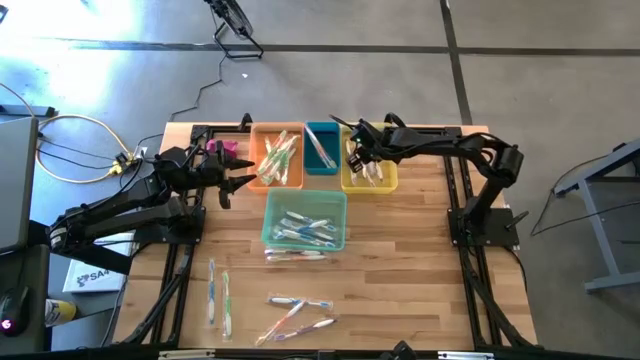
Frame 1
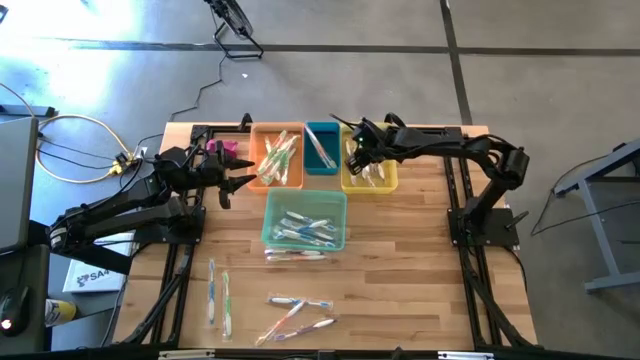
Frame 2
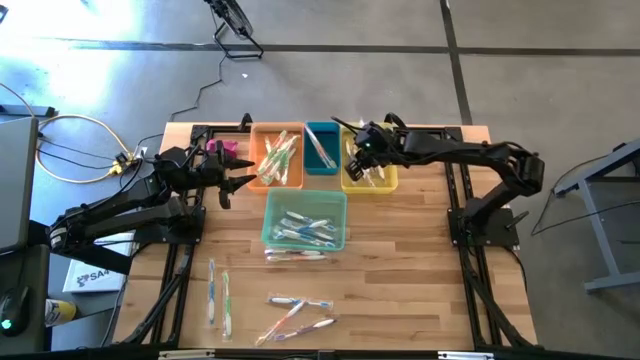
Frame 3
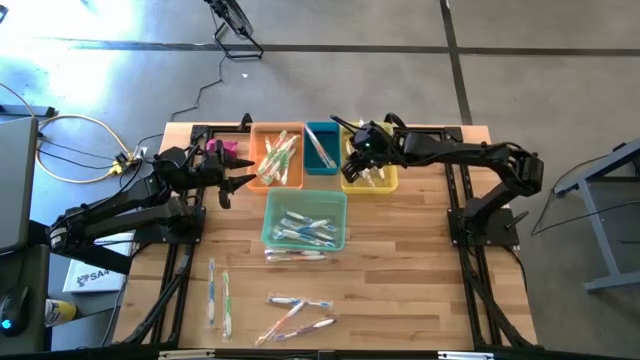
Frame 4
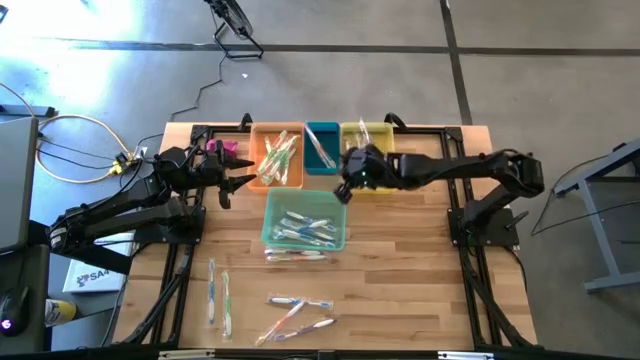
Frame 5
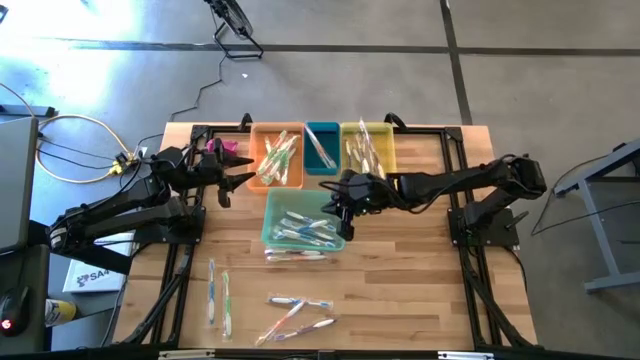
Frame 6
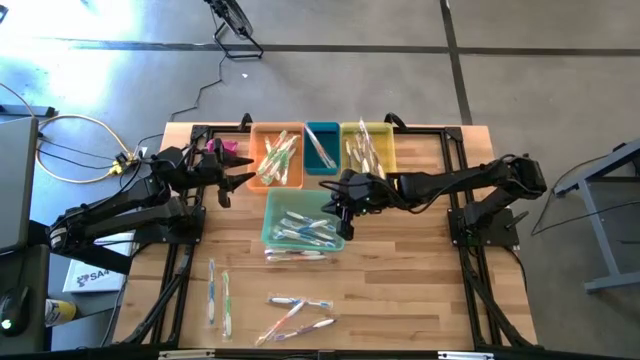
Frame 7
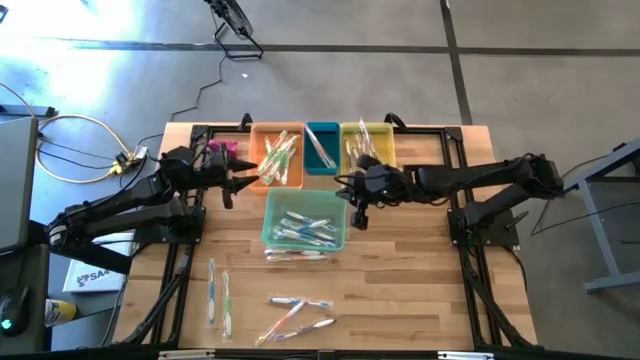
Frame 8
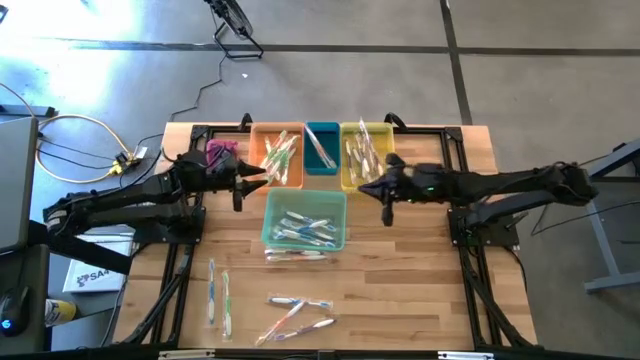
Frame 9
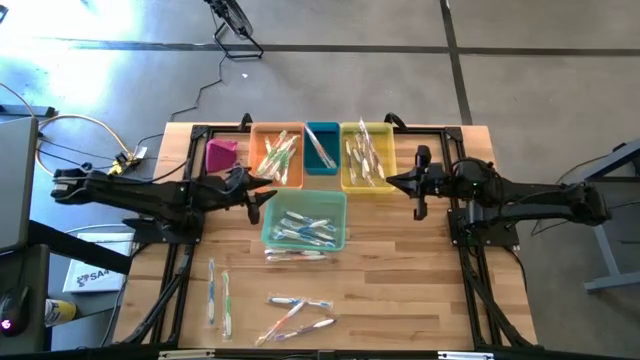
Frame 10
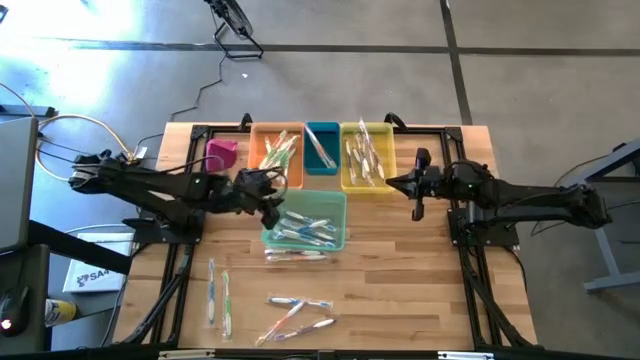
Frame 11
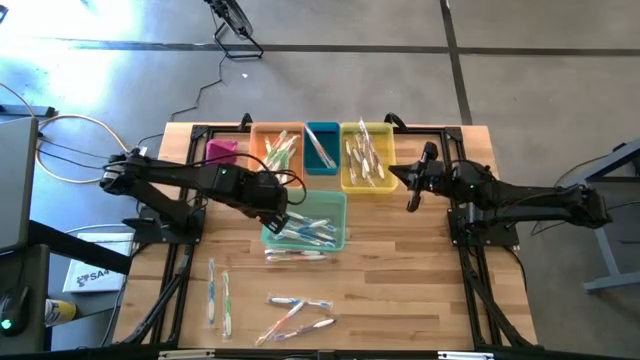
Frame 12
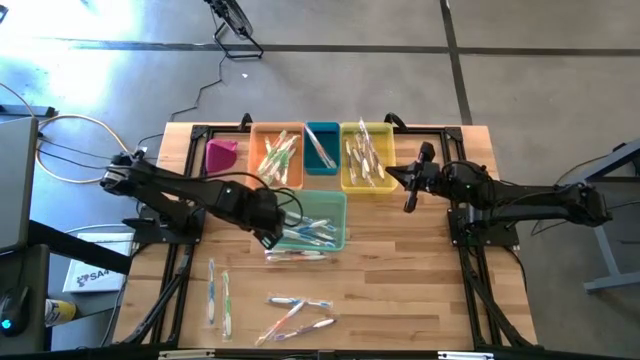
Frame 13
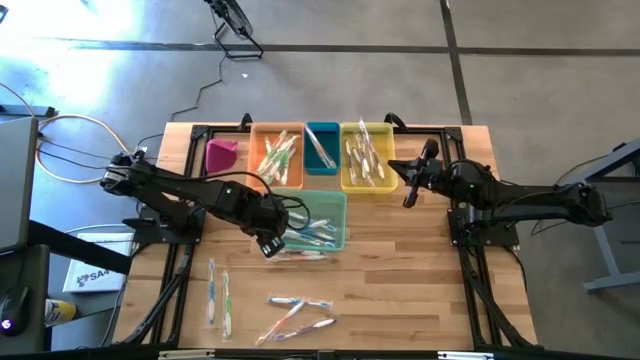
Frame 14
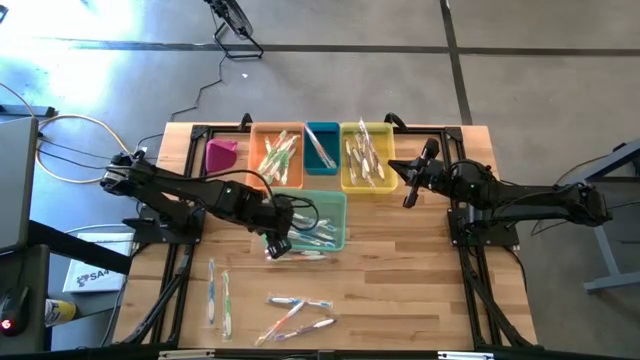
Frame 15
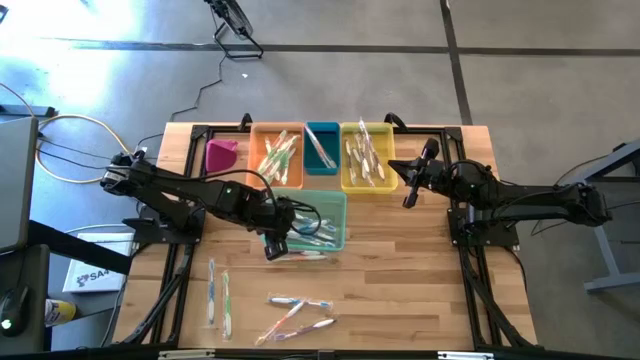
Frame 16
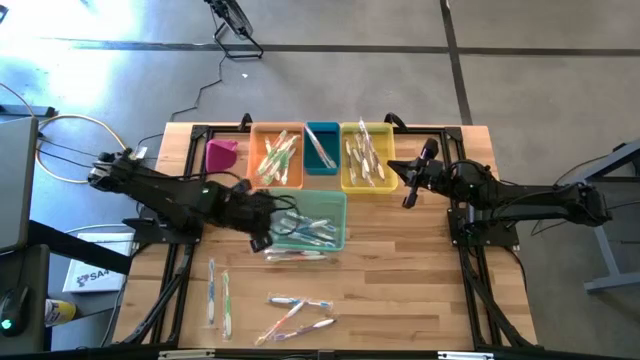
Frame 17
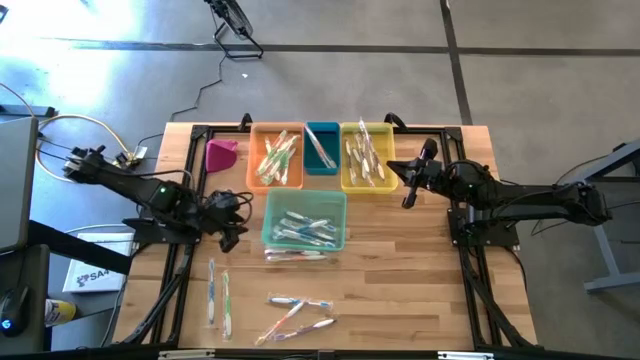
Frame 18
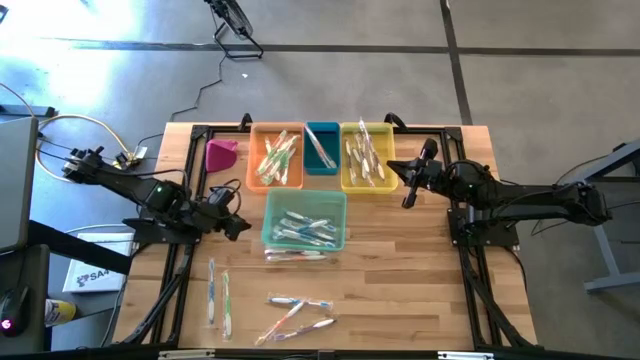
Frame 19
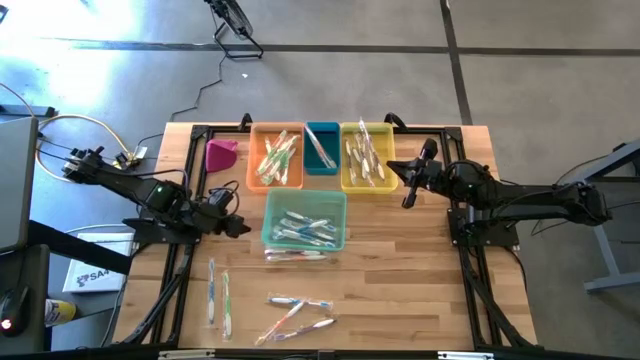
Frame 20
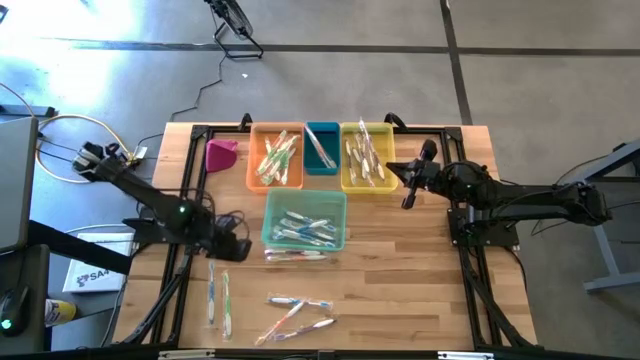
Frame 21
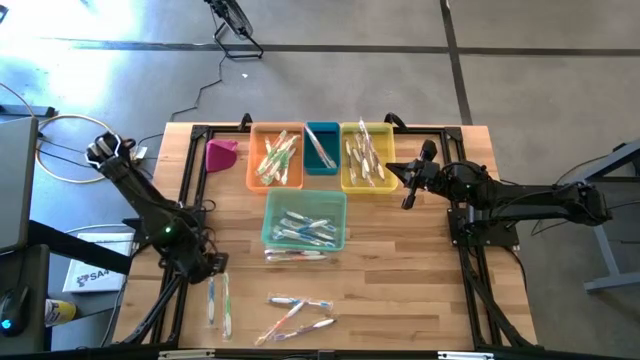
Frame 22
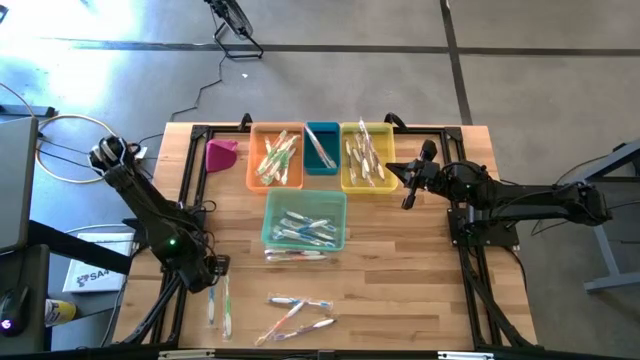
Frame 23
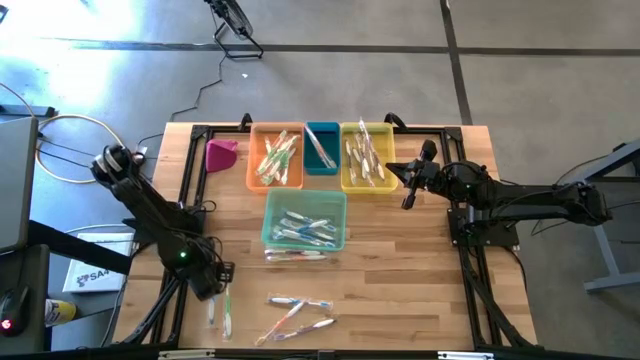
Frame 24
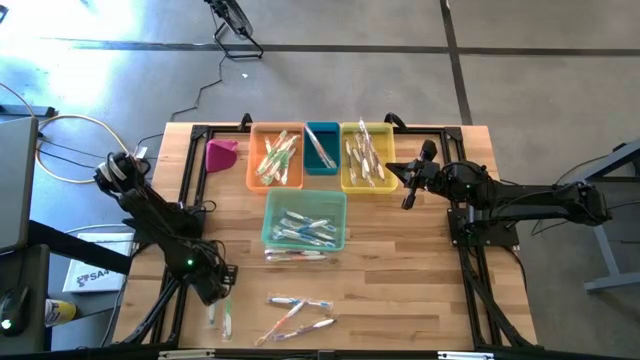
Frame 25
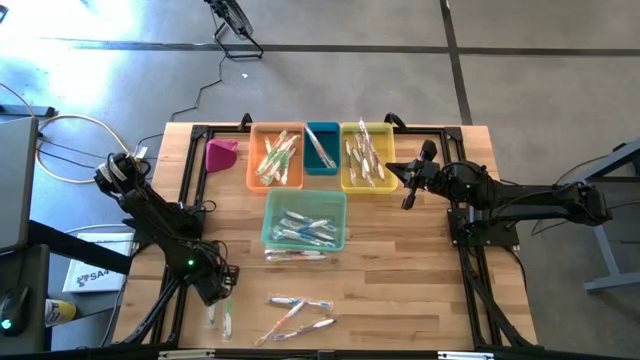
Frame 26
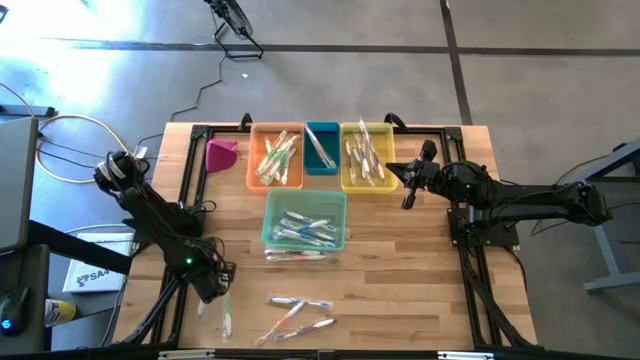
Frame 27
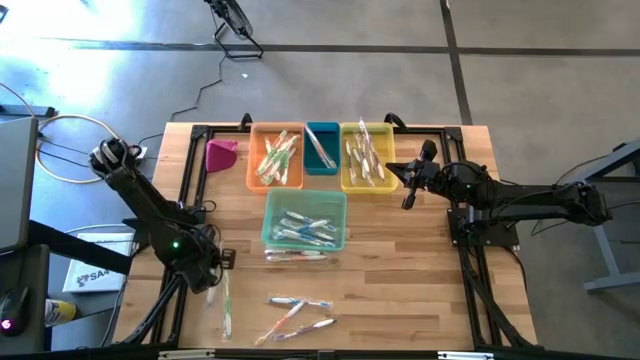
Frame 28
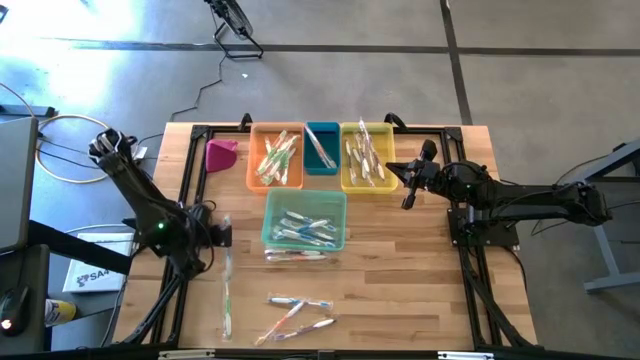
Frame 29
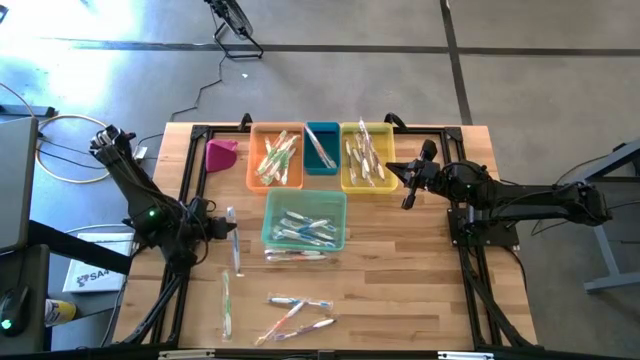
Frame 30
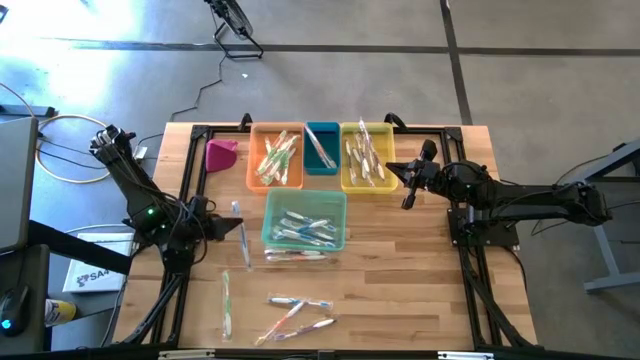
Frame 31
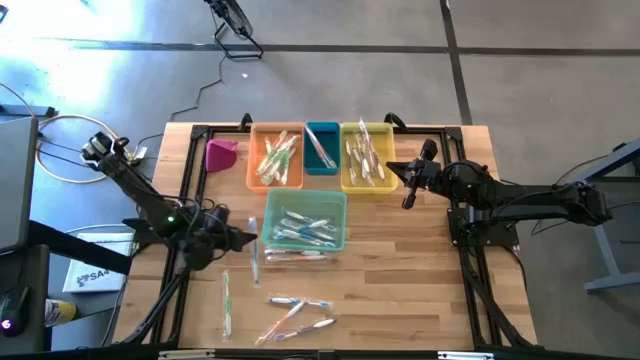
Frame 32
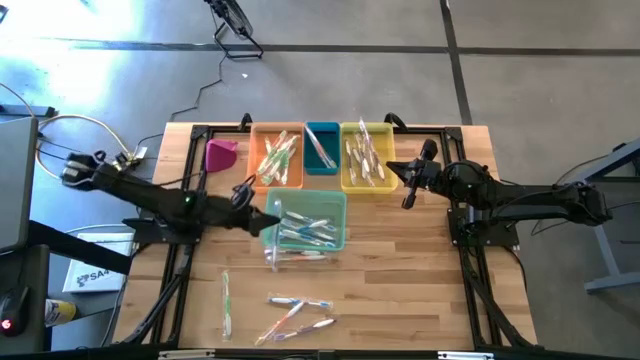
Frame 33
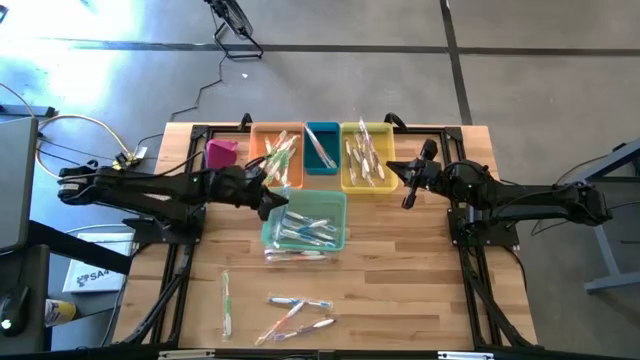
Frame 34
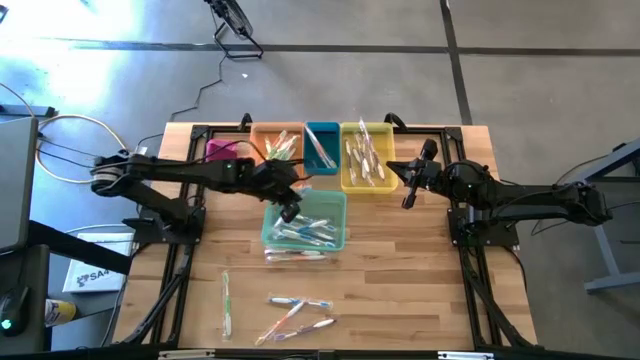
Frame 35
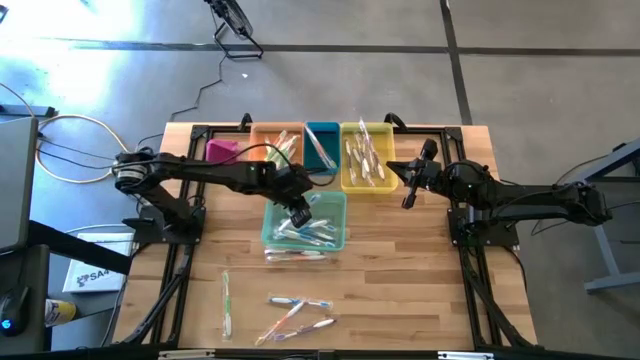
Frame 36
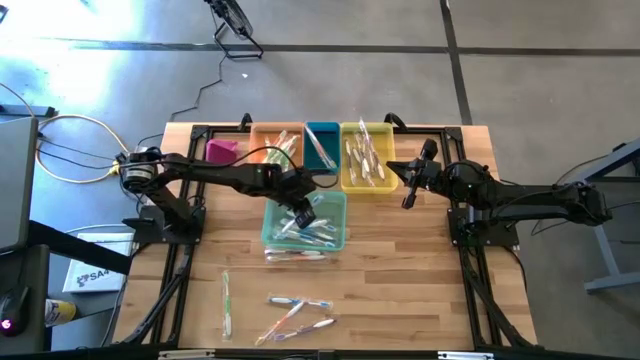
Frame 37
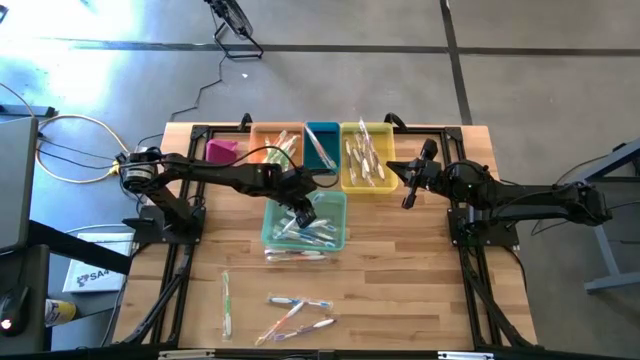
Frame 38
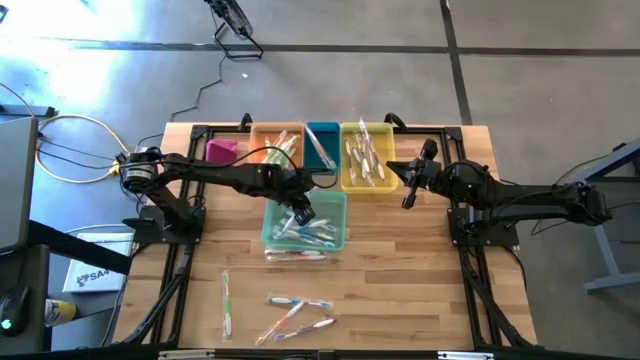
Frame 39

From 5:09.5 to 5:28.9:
Task: Pick & Place Toothbrushes
Put the blue toothbrush into the green bin
